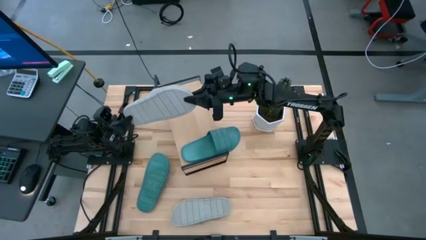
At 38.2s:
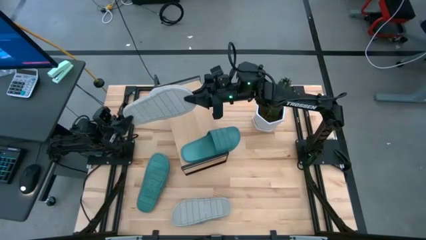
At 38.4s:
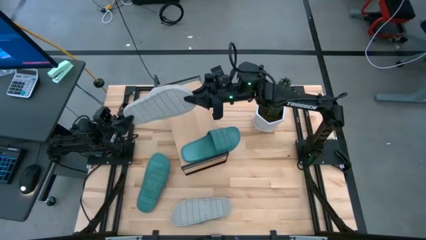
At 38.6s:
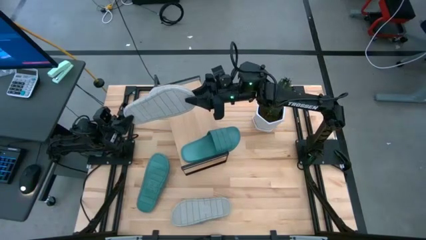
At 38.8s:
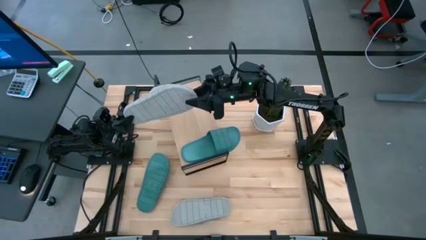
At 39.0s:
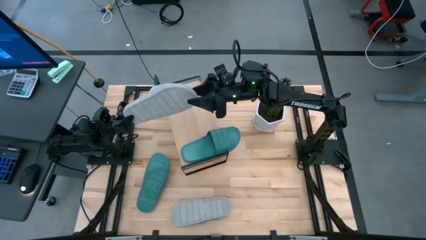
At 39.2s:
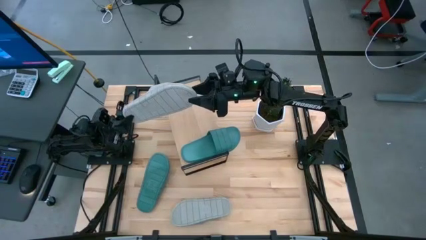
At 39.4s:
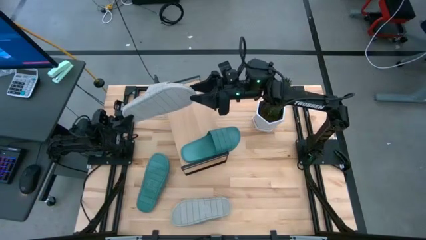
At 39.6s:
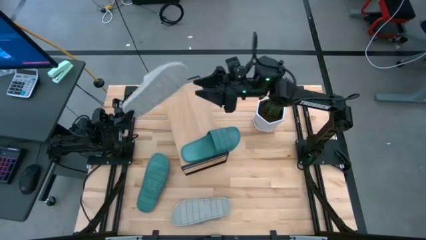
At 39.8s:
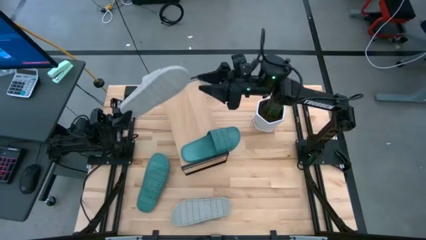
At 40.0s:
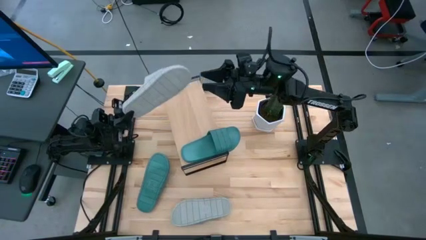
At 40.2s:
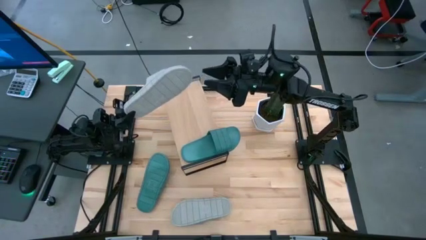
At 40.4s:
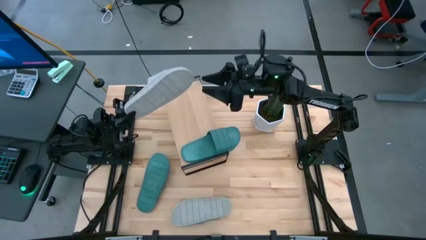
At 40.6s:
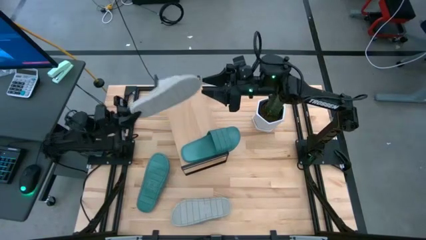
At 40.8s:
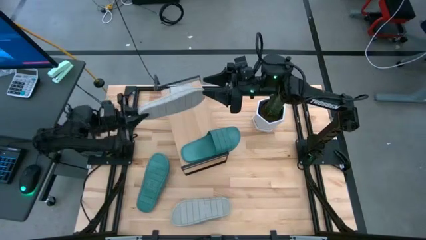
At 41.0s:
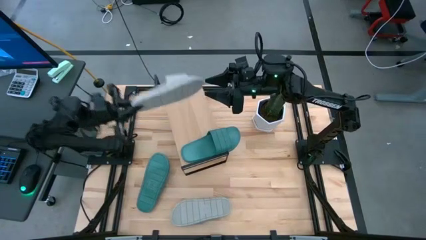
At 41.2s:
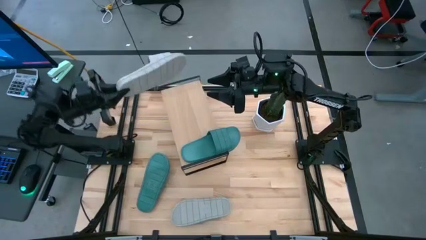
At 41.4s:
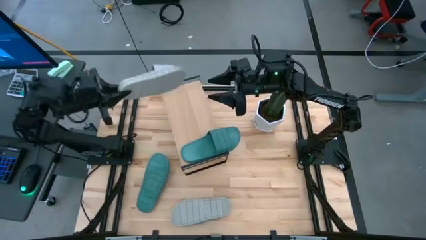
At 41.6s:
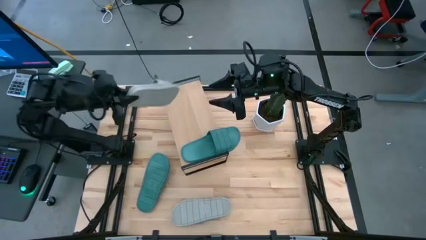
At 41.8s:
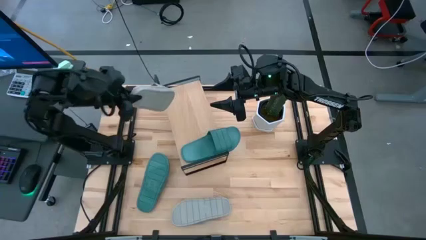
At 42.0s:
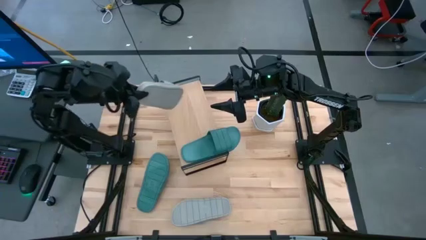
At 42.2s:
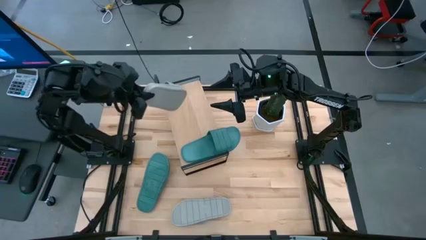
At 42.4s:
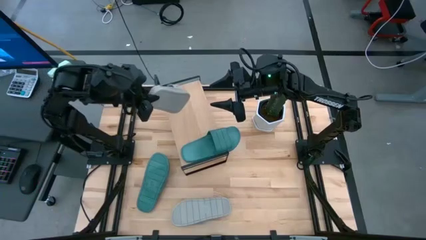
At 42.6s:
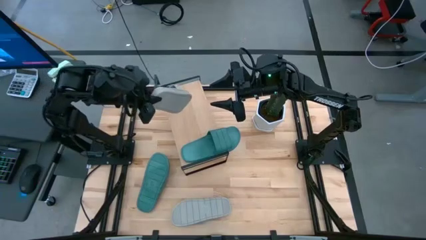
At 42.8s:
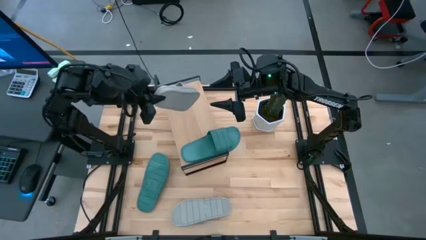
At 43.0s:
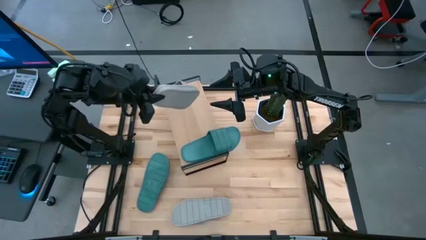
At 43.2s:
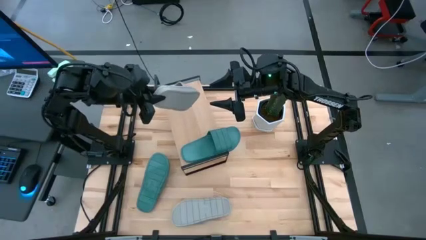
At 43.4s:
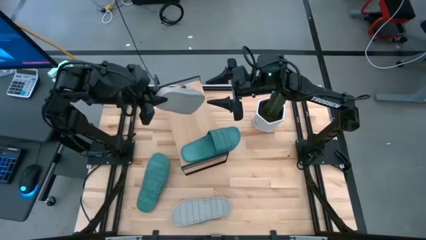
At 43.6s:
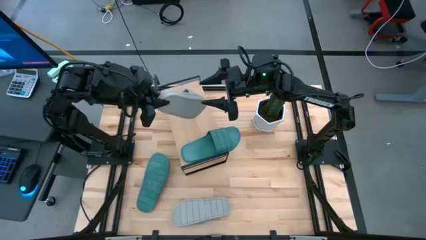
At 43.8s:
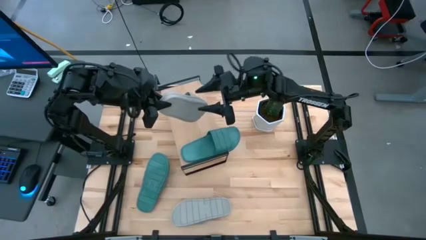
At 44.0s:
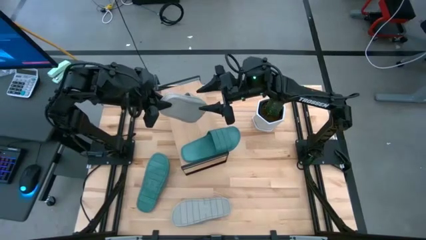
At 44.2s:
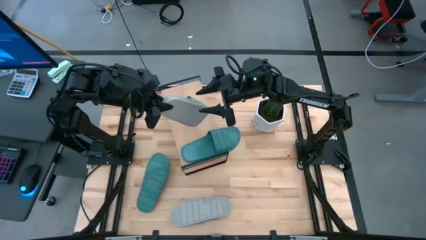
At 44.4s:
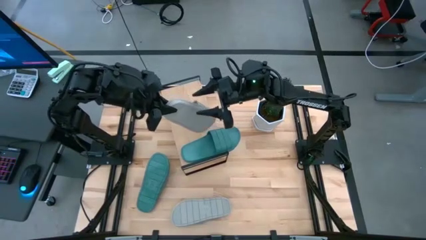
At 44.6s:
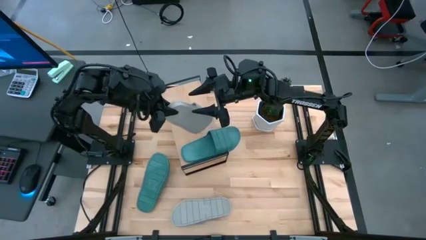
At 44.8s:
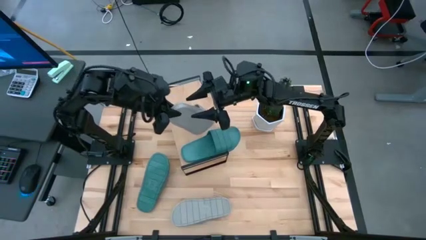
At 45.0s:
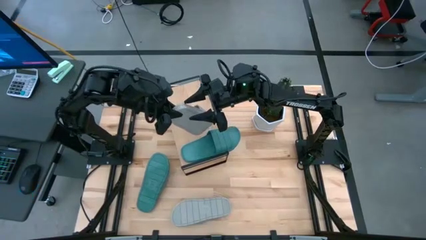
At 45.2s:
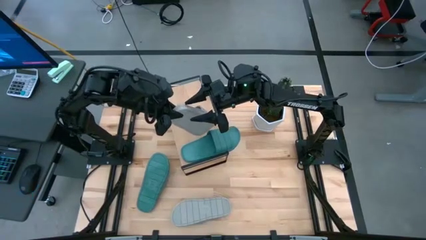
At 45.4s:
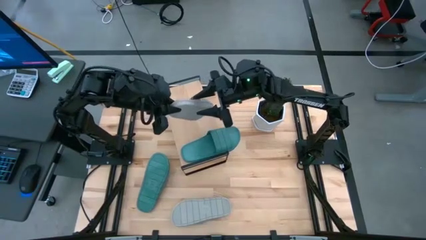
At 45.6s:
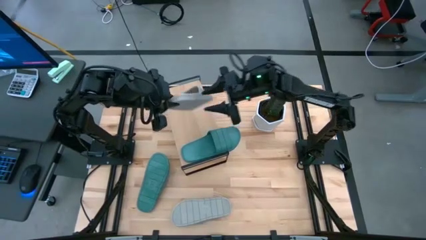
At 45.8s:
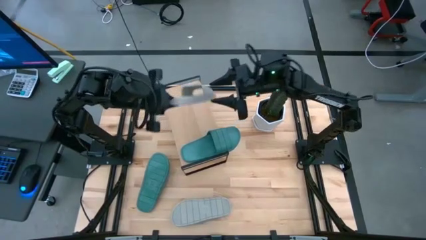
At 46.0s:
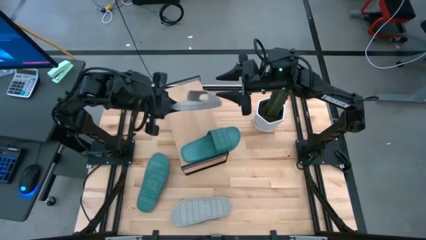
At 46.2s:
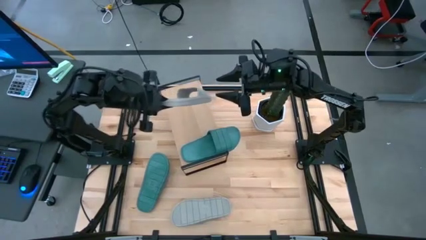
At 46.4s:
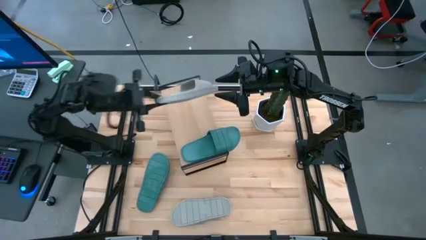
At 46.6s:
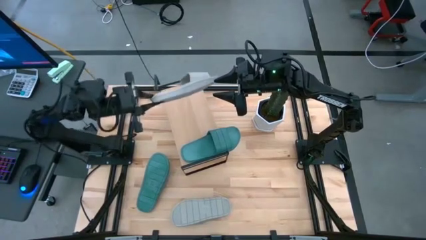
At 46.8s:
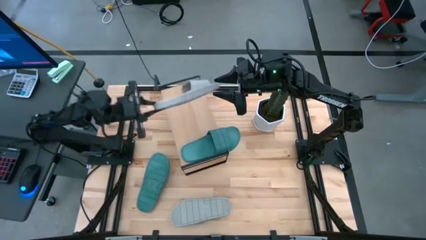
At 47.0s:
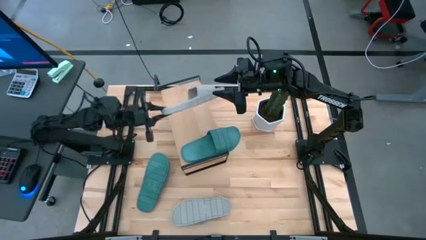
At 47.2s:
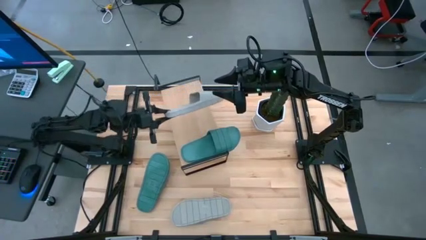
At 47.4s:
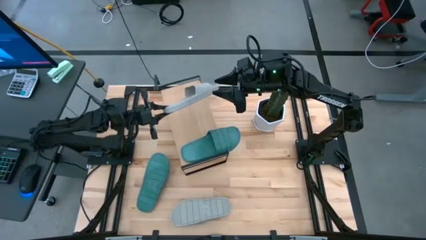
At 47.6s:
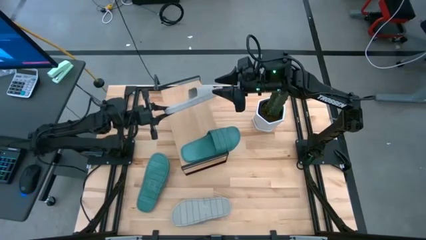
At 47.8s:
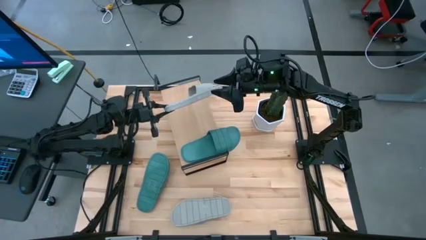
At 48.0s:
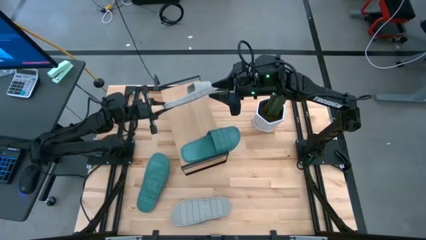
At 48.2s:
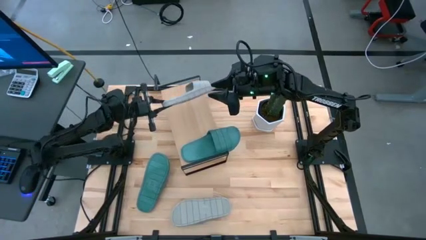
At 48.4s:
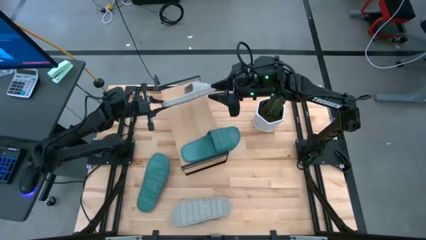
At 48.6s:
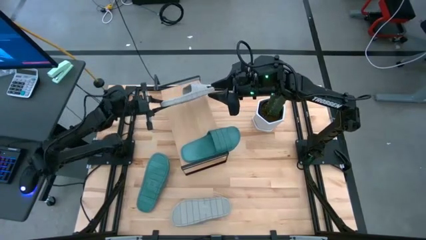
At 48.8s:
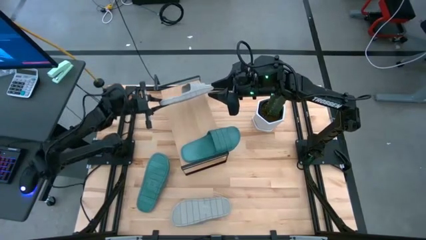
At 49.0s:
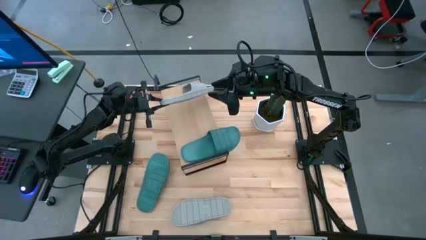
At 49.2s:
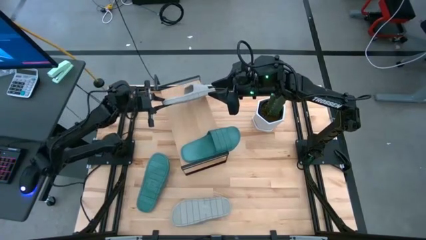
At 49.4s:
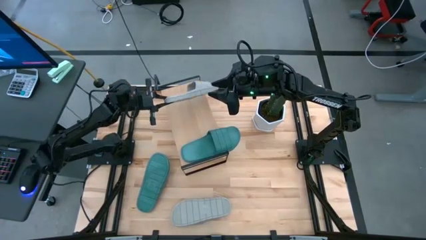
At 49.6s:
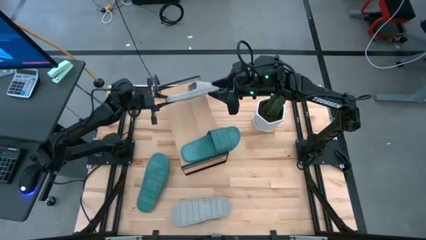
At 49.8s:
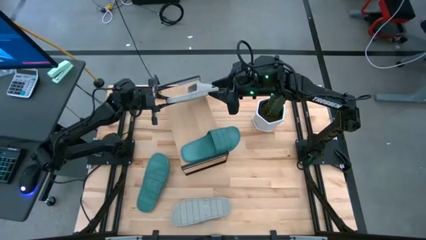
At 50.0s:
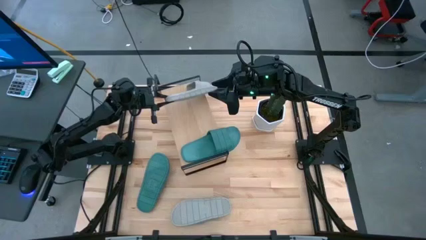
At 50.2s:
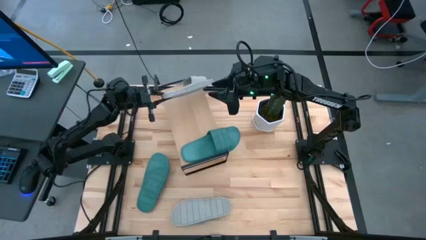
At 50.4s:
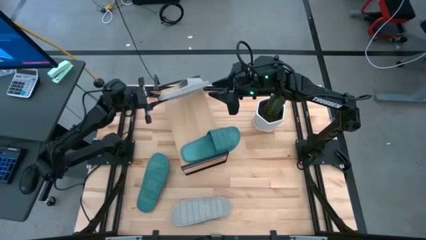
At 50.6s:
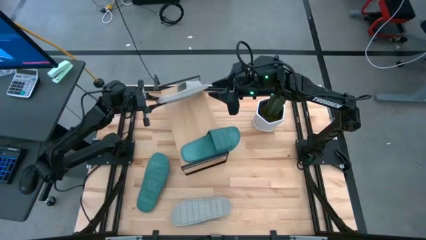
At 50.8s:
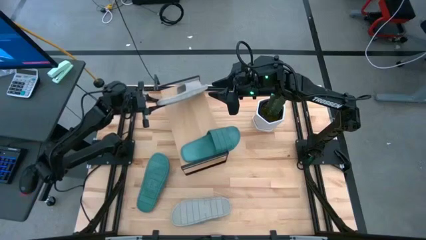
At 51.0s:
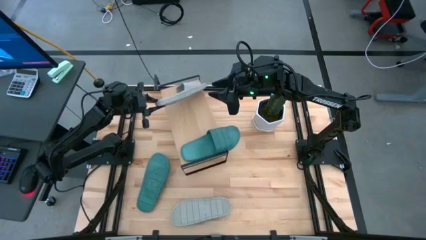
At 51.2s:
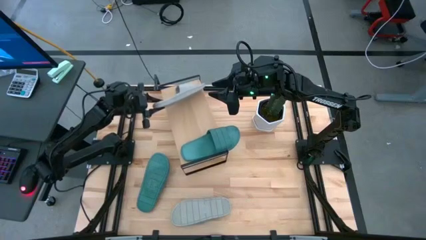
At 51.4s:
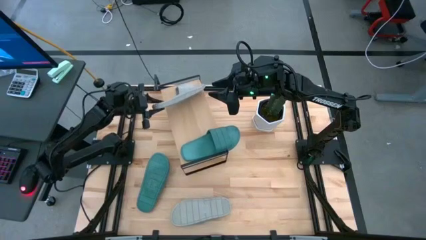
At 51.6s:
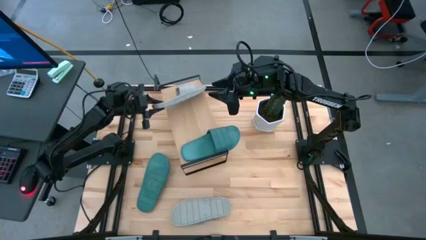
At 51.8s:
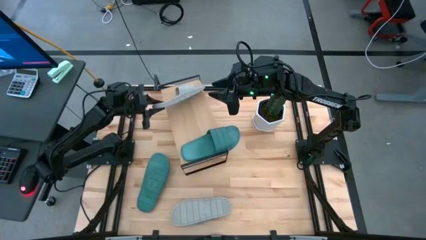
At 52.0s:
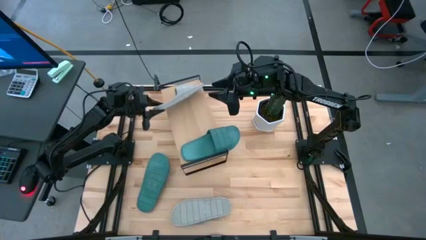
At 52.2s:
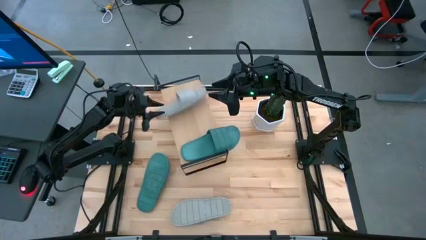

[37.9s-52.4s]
Task: Pick and place slides into the shelf
Put the top white slipper on the shelf

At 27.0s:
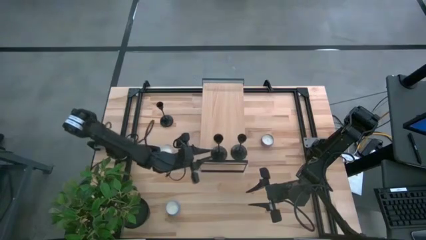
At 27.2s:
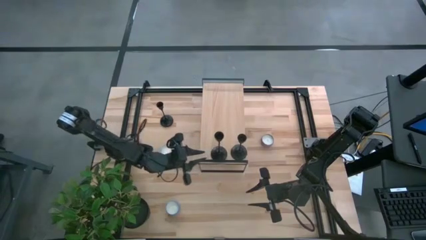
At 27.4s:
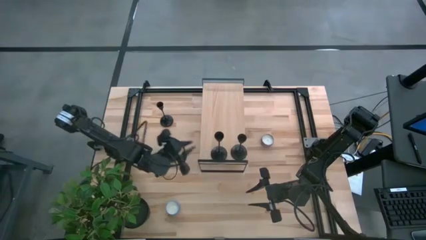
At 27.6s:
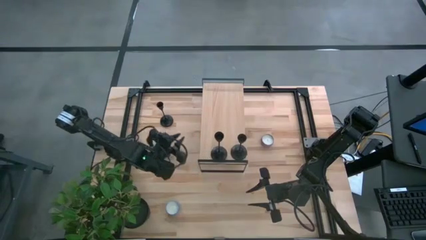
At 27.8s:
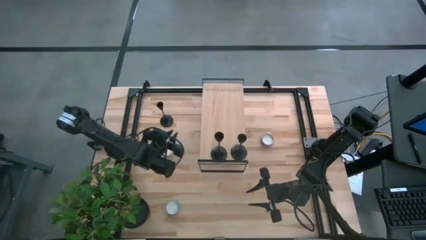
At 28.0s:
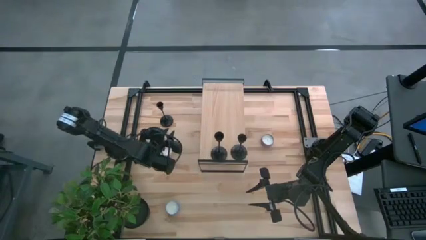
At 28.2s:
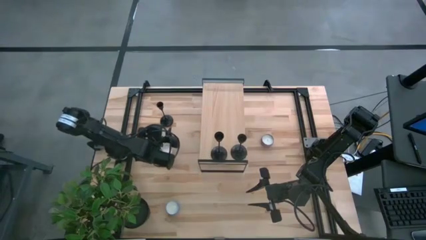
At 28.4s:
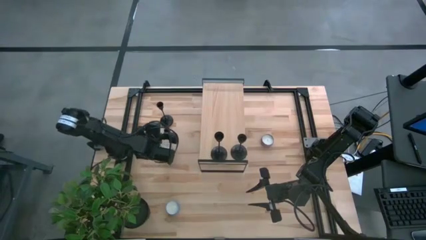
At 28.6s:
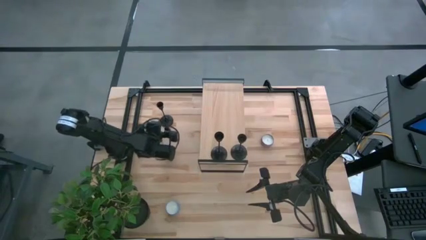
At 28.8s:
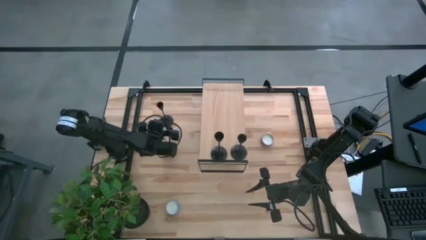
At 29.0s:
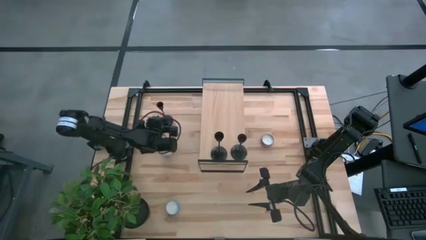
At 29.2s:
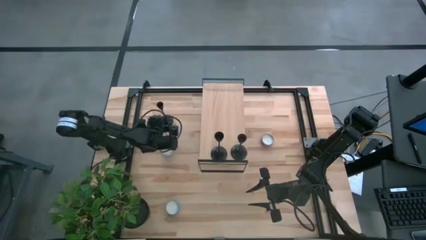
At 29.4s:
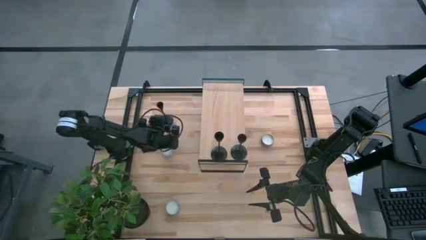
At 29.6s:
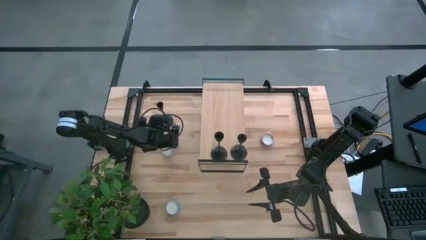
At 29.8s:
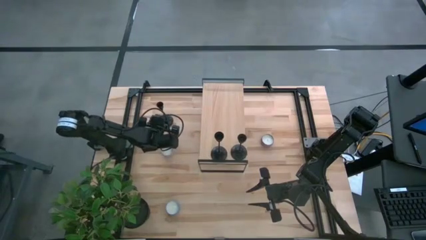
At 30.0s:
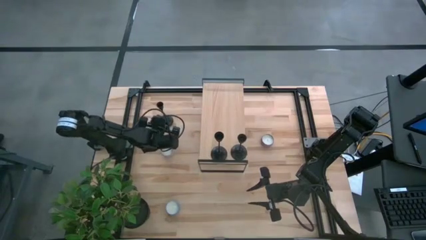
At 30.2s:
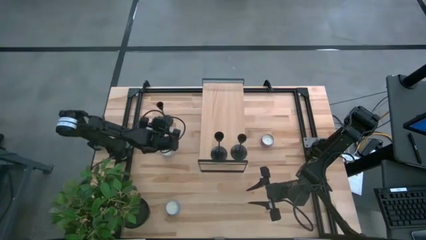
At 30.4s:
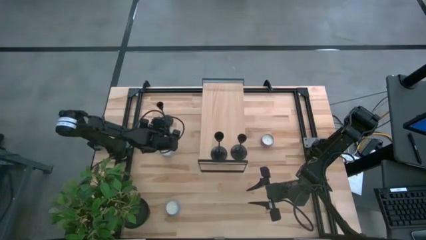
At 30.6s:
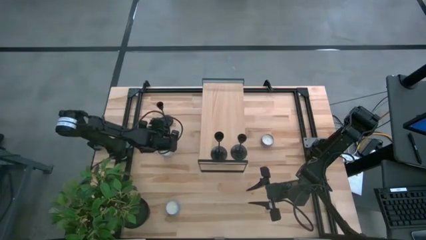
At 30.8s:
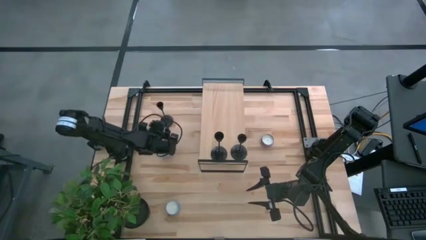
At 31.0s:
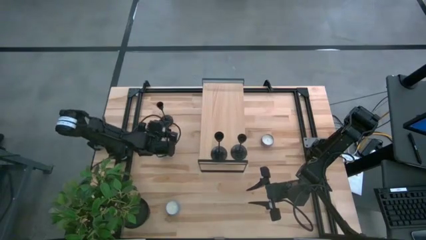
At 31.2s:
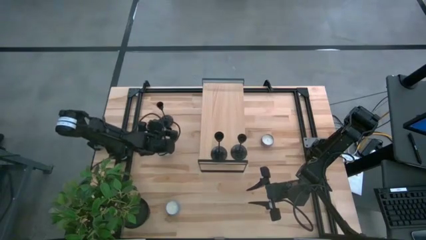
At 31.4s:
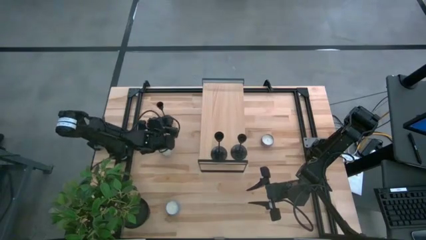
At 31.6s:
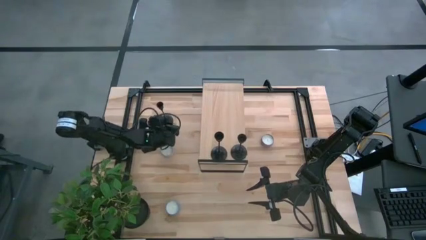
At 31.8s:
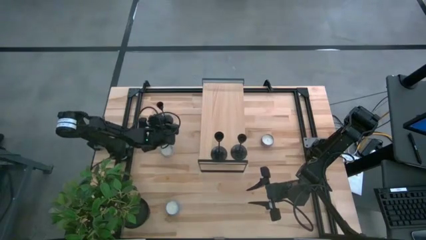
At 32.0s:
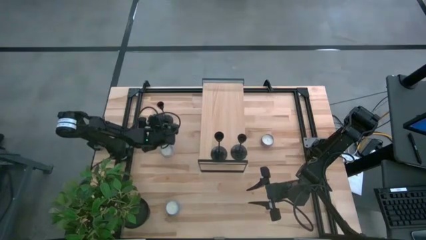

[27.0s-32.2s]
Task: Pick & Place candle stick holders
Put the black candle holder on the shelf aligned with the other black candle holder
